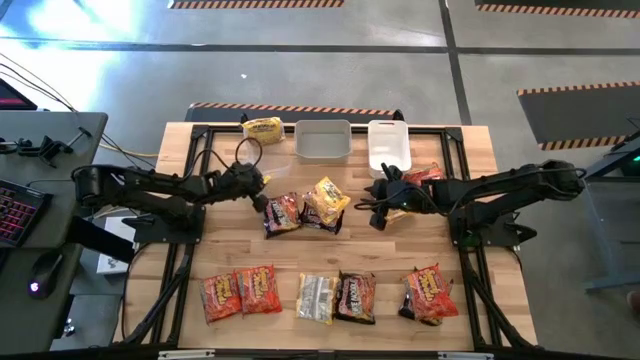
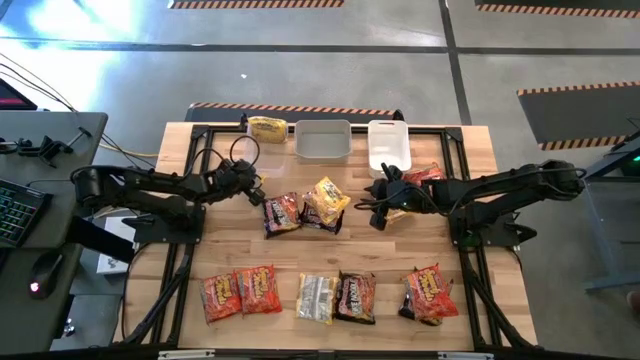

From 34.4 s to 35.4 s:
Task: Sort Maruchan noodles
Adjust the transparent bin on the table

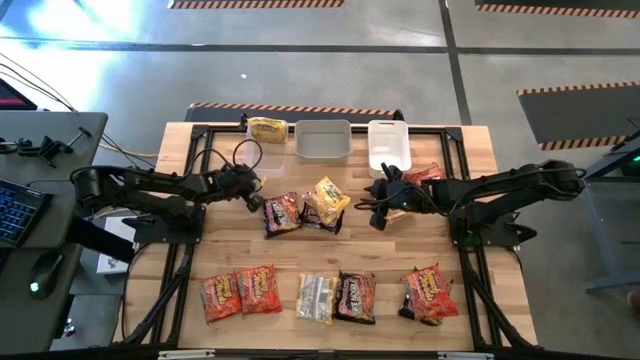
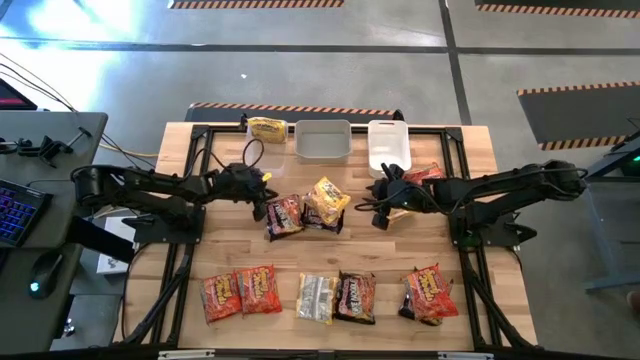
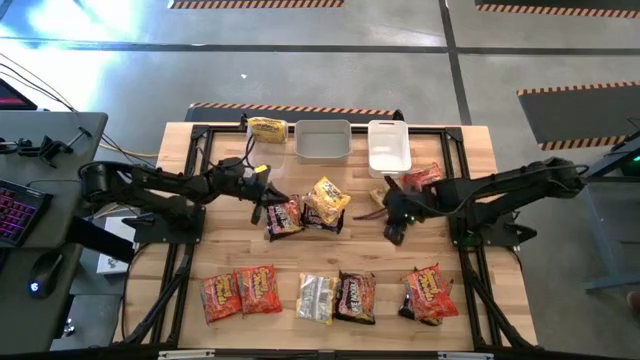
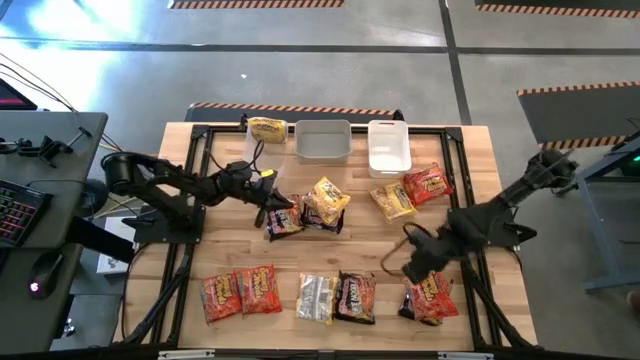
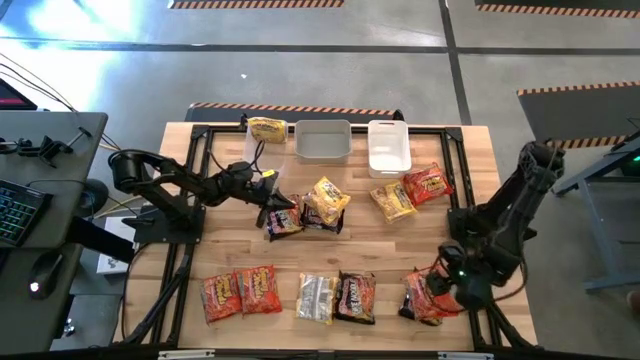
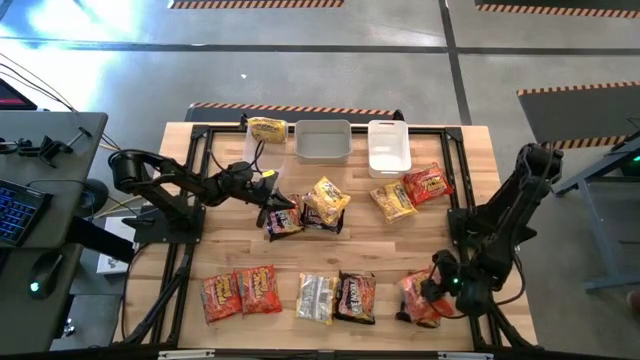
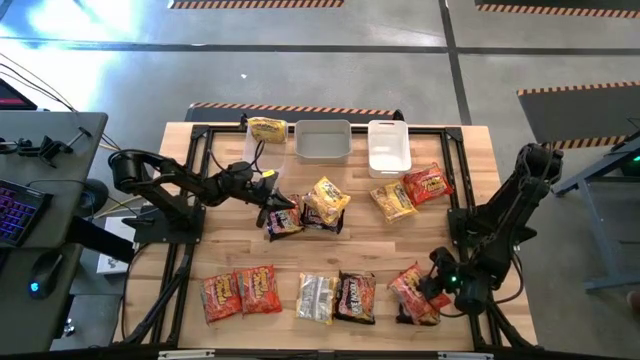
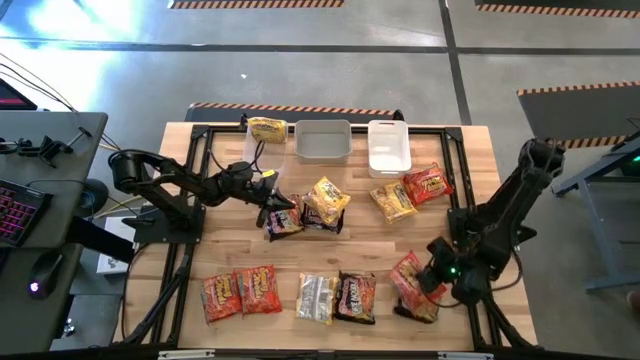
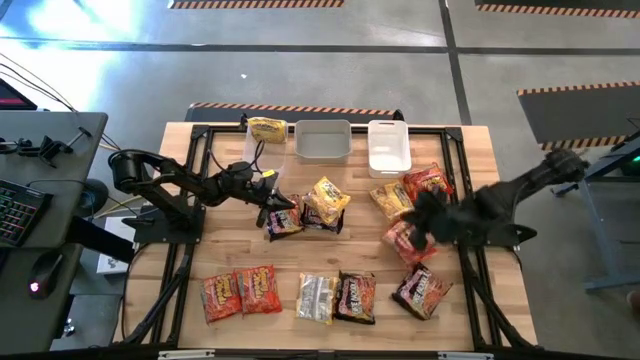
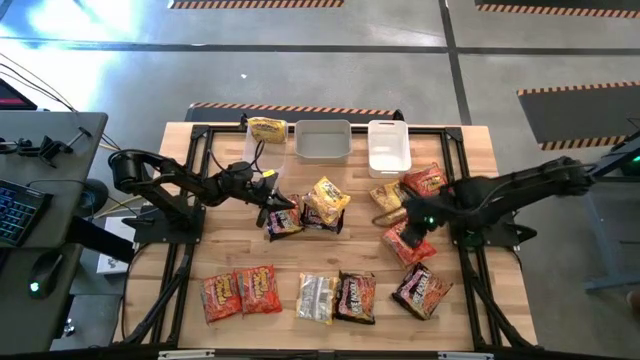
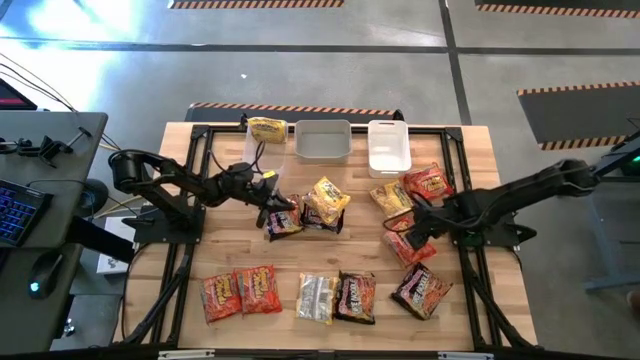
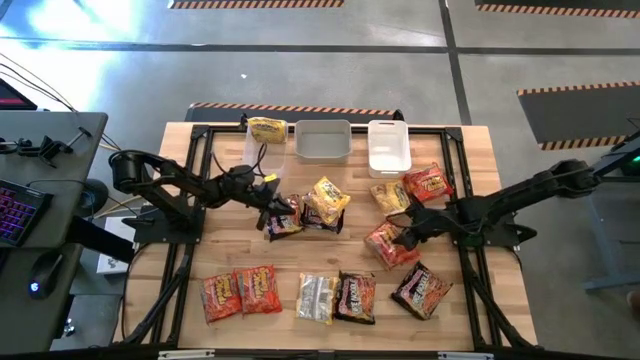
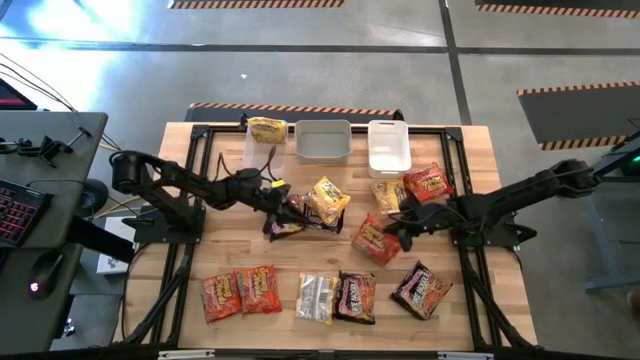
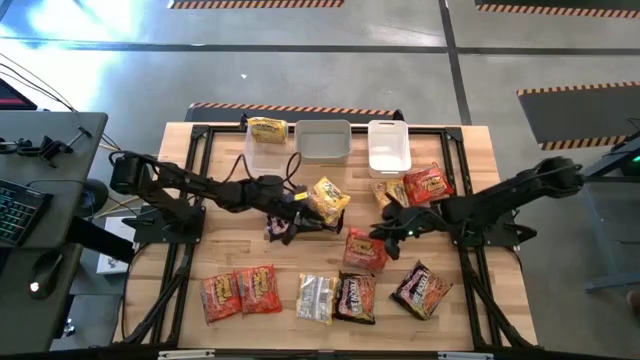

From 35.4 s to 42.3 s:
Put the orange noodle pack into the gray bin

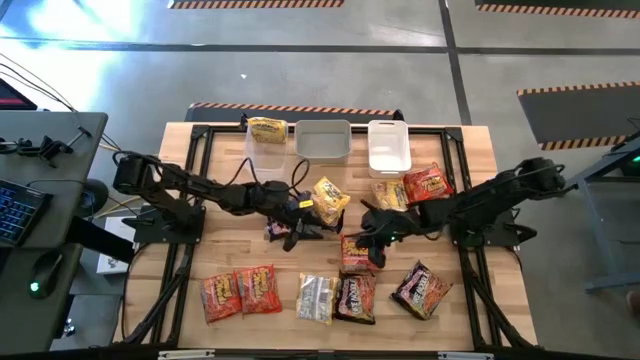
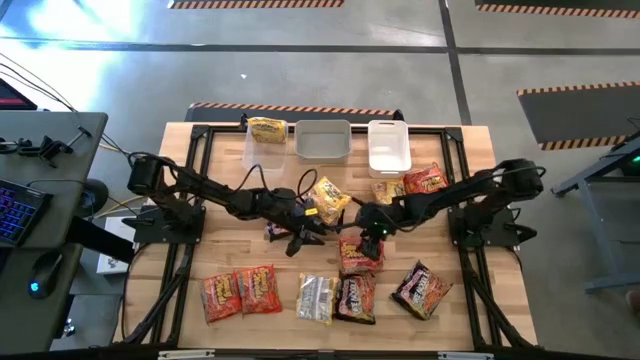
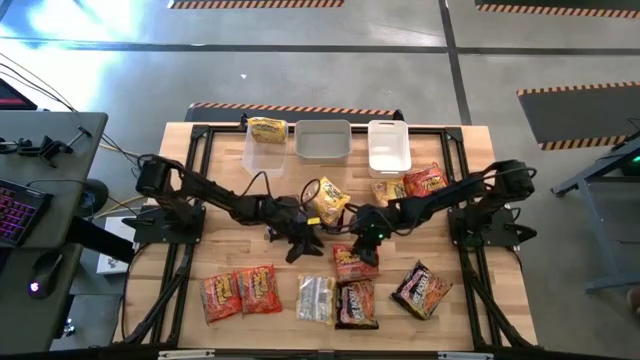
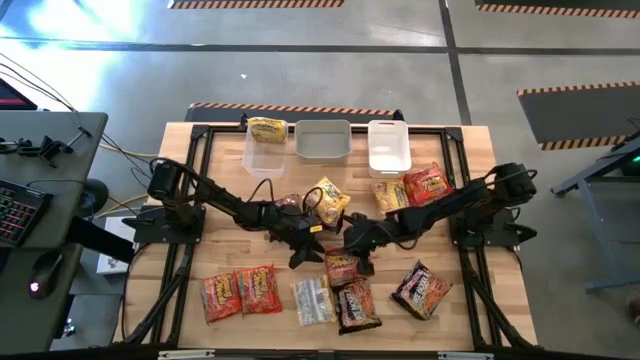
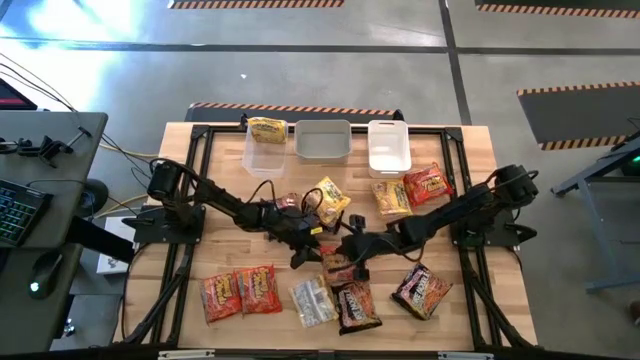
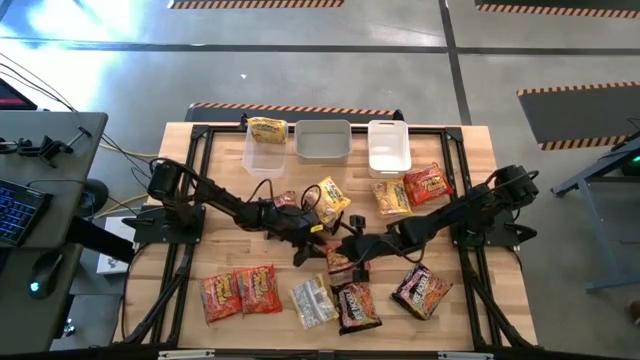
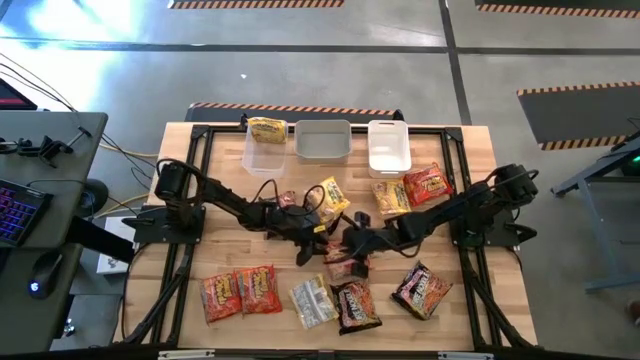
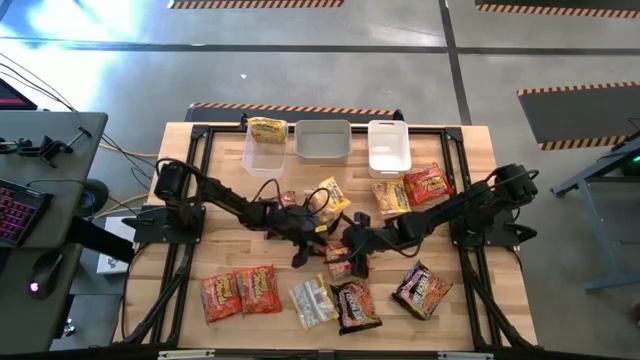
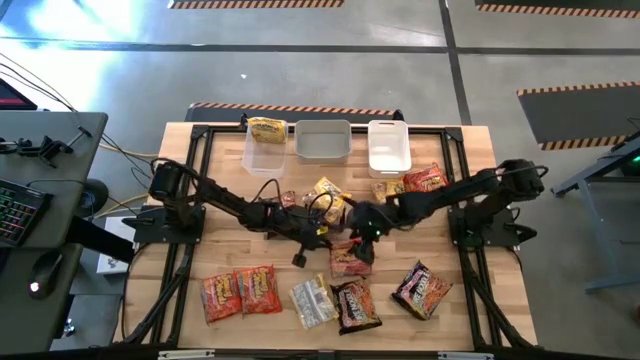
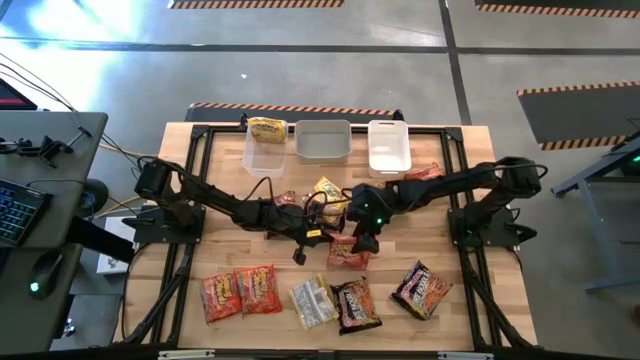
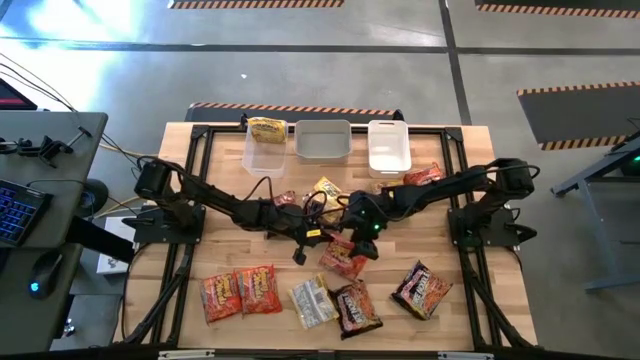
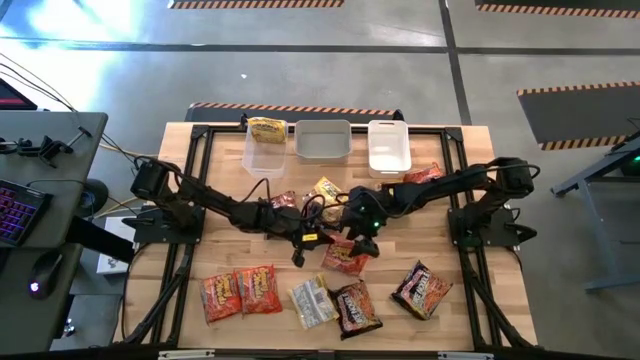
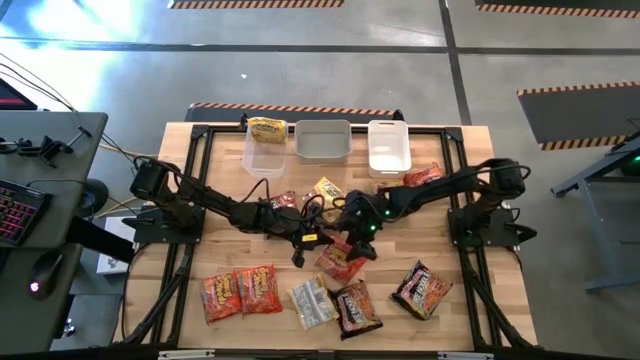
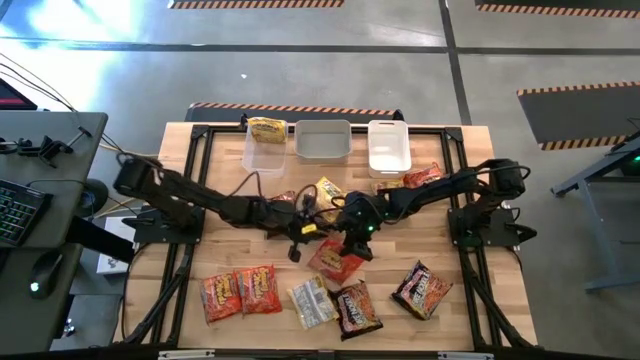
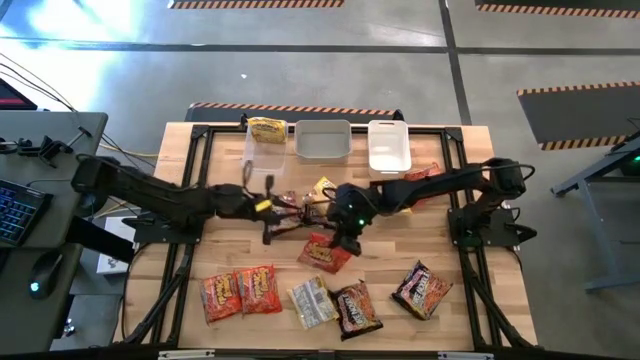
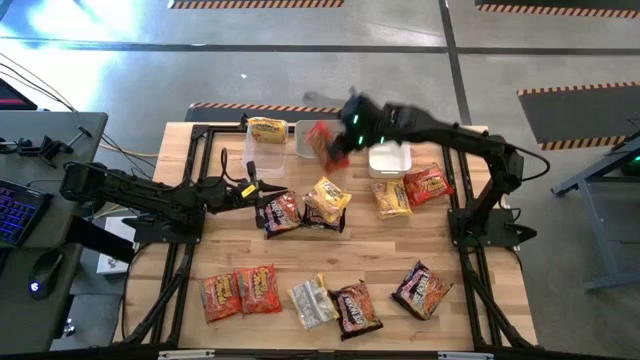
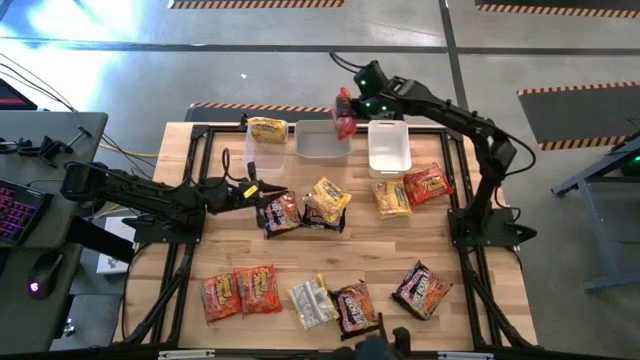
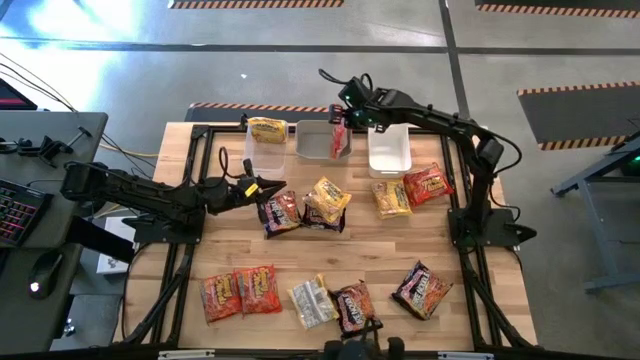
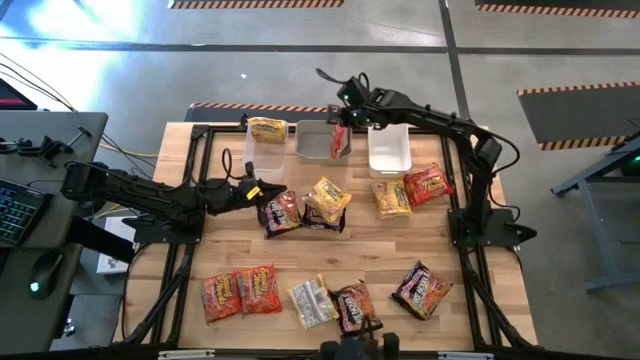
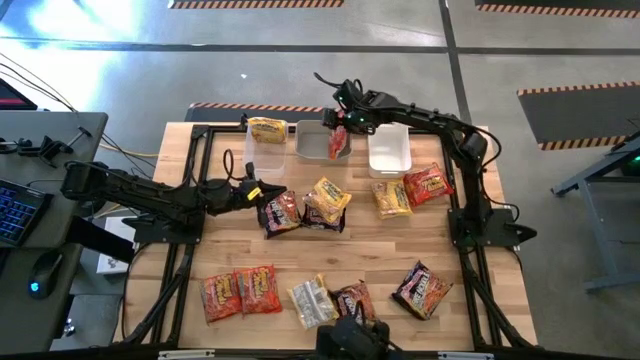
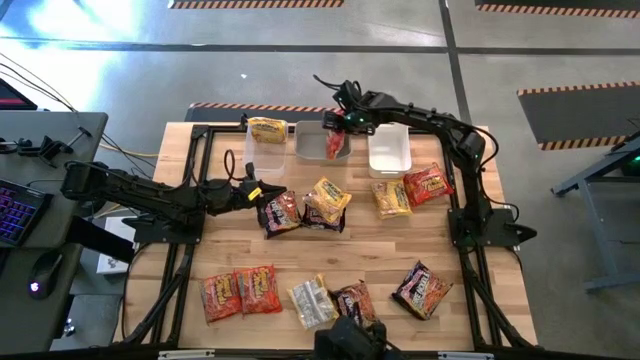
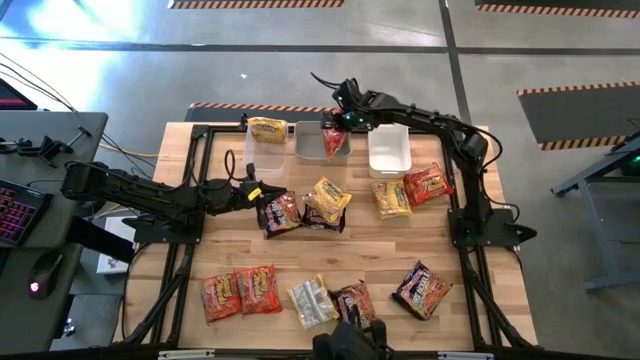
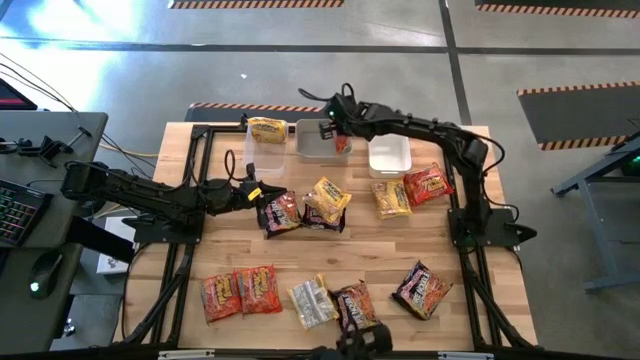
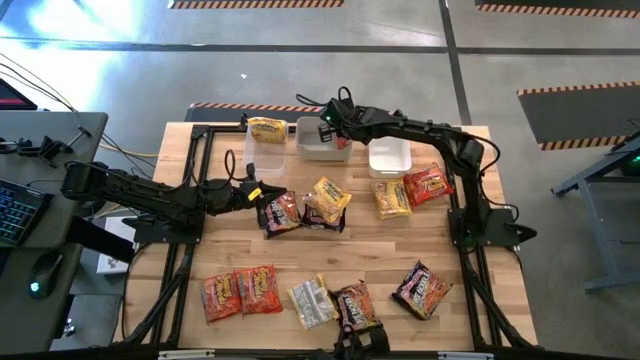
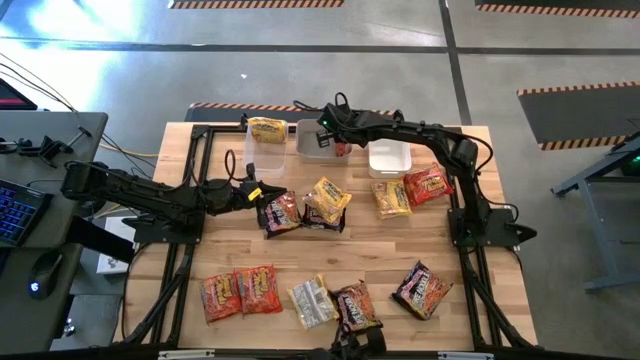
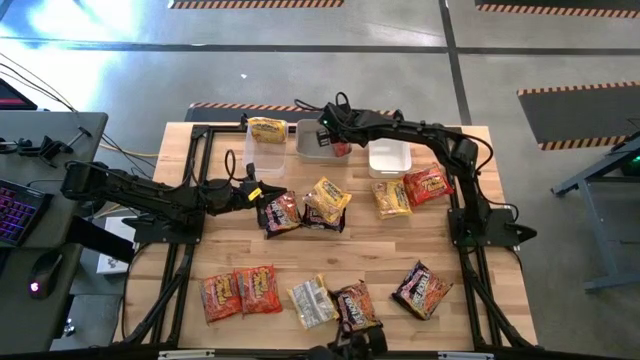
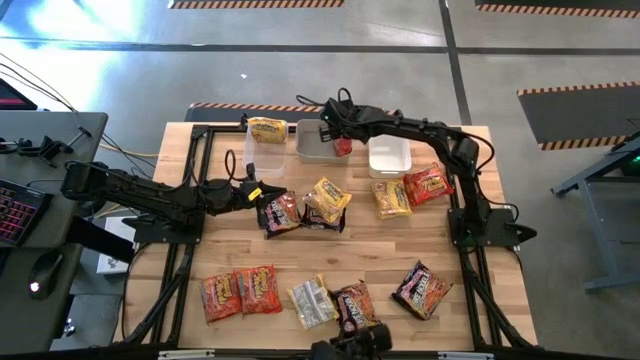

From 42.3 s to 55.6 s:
Put the orange noodle pack into the gray bin
